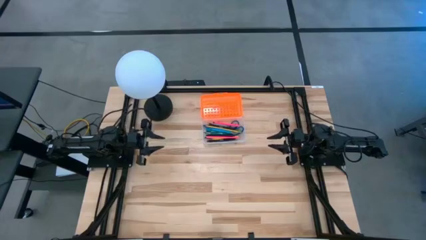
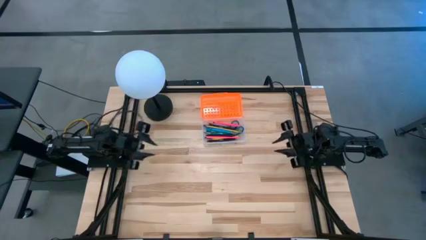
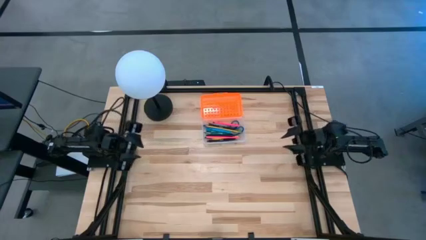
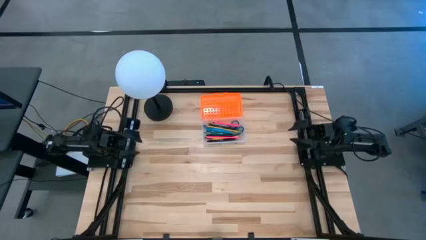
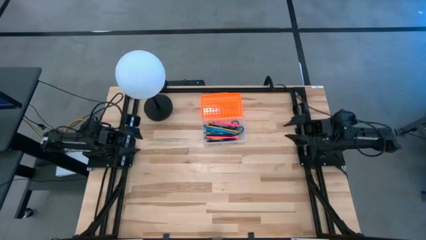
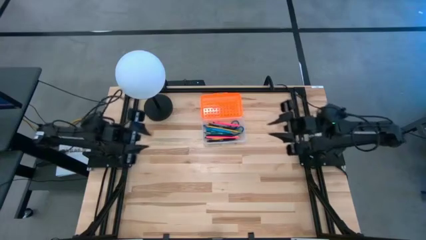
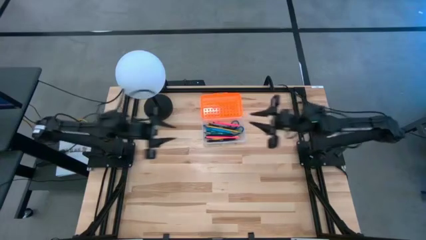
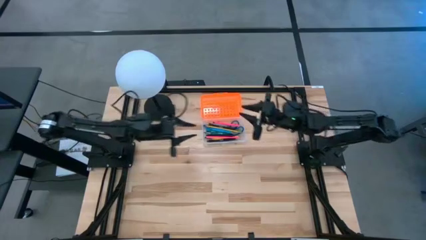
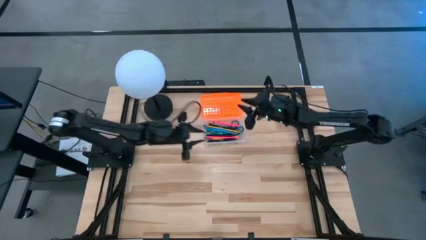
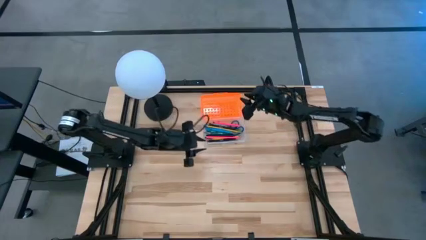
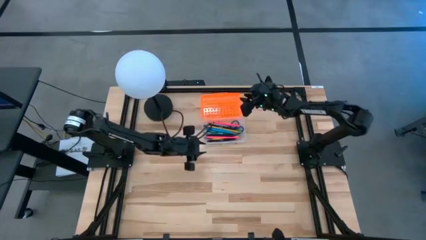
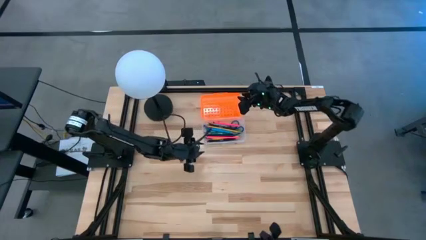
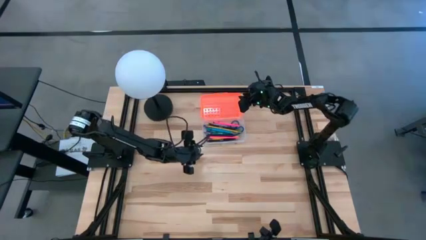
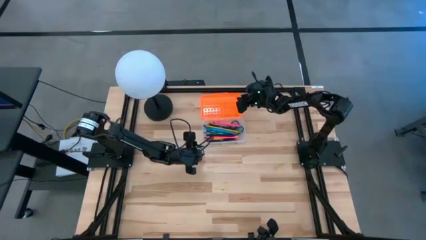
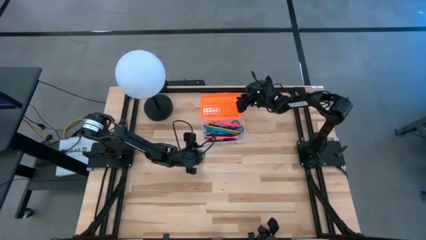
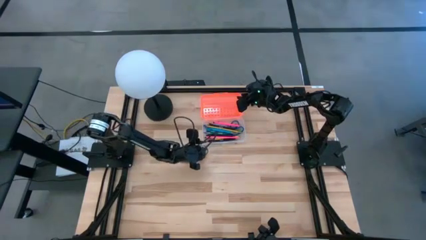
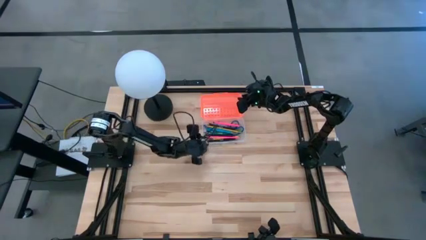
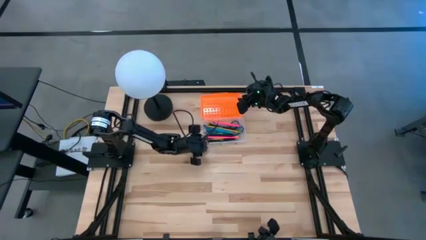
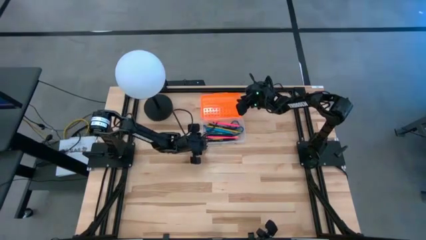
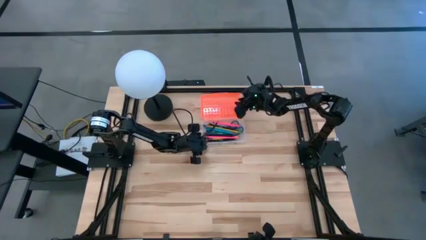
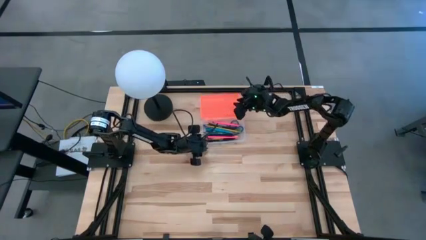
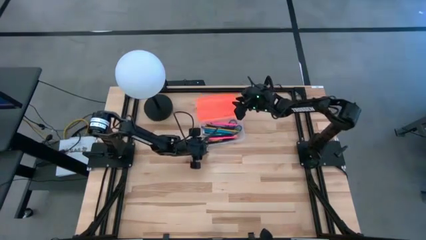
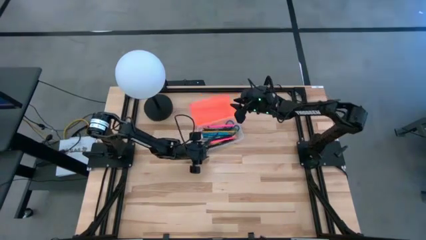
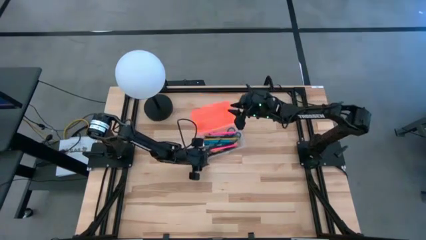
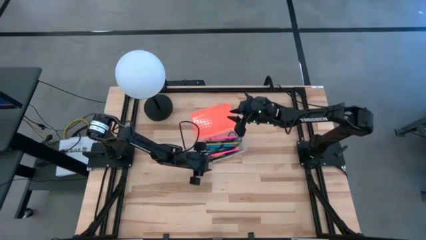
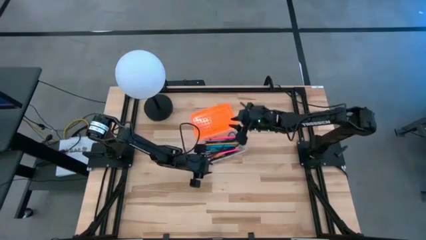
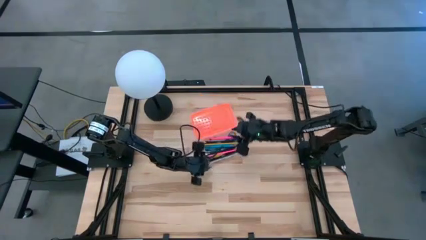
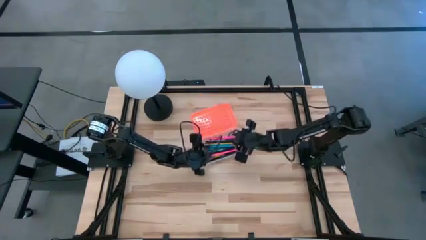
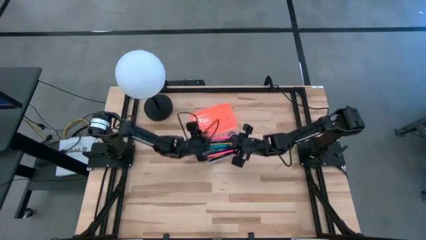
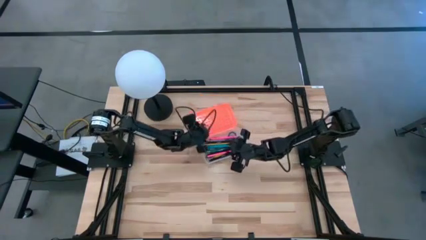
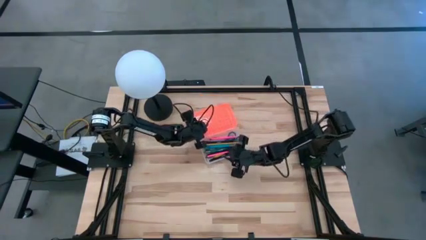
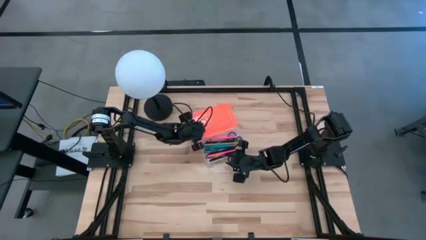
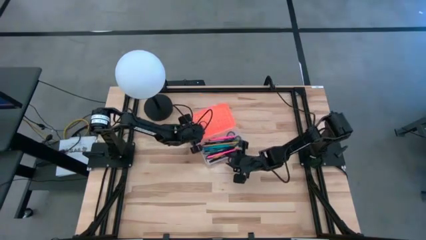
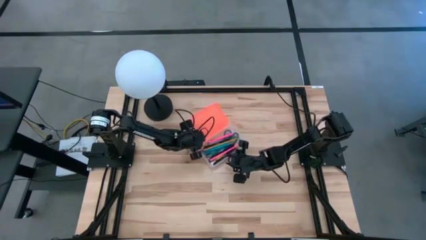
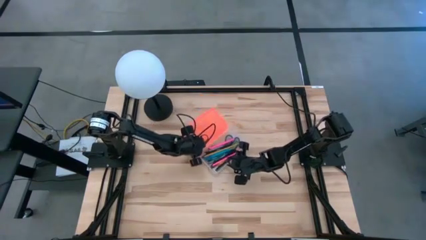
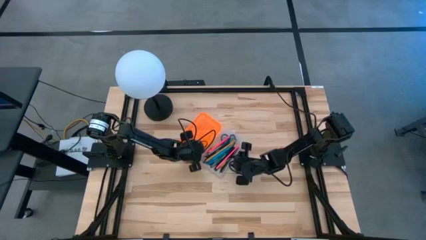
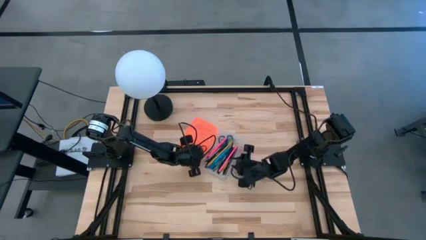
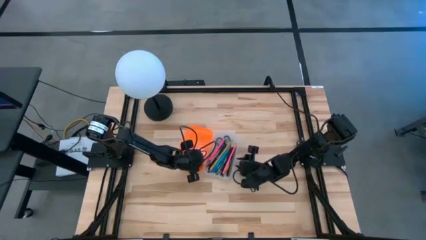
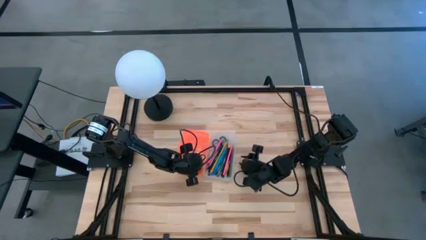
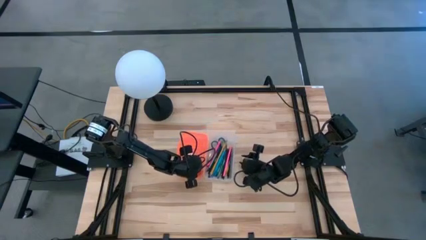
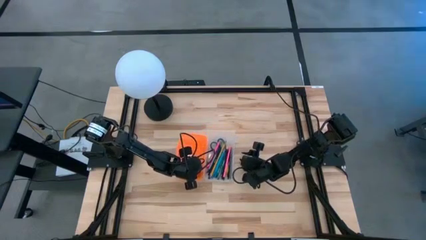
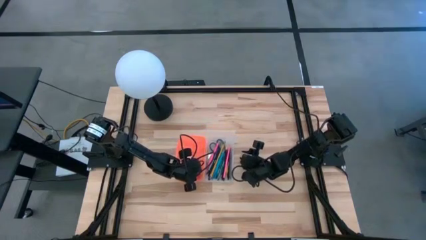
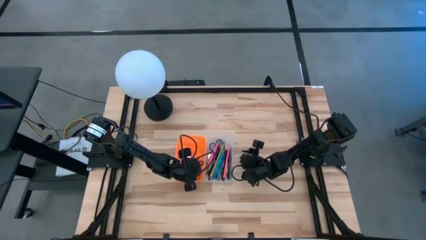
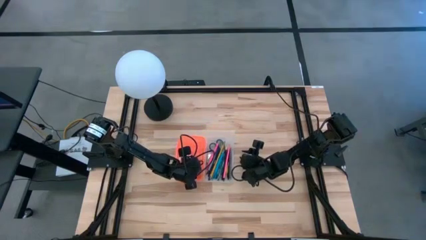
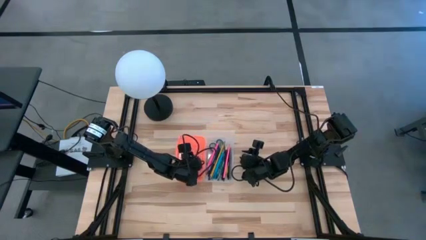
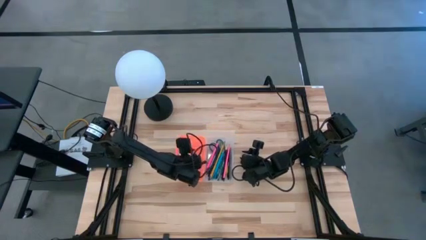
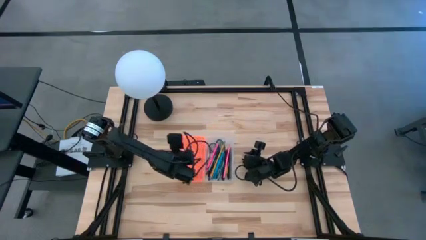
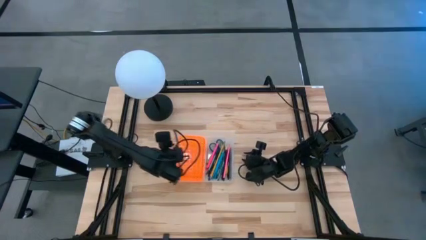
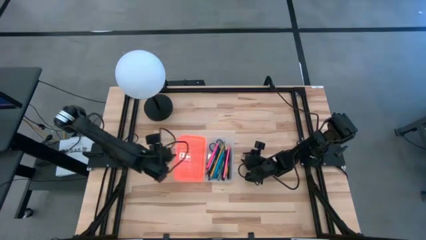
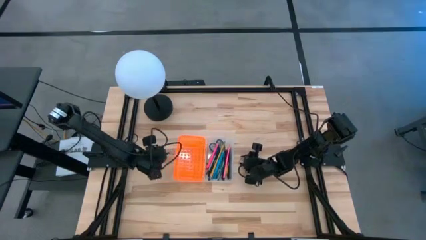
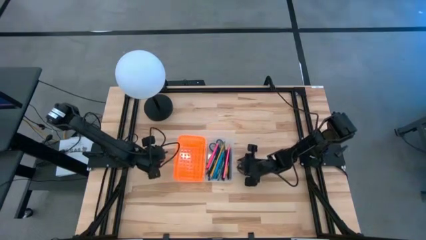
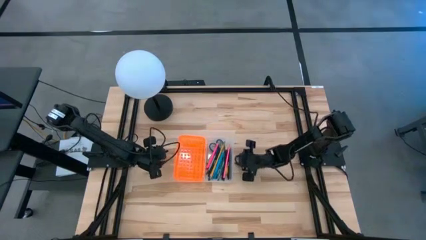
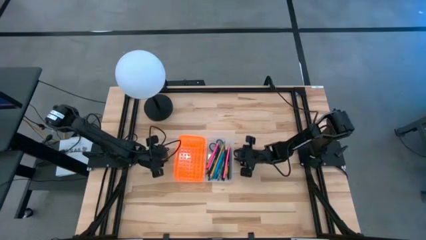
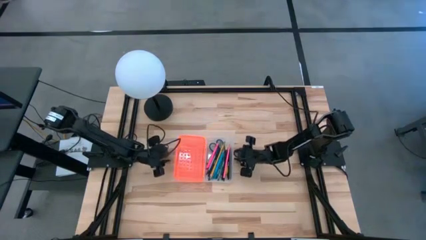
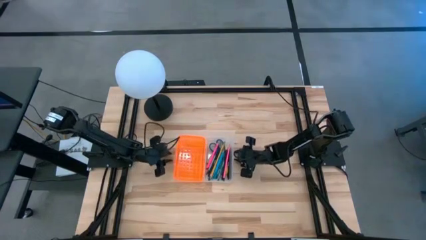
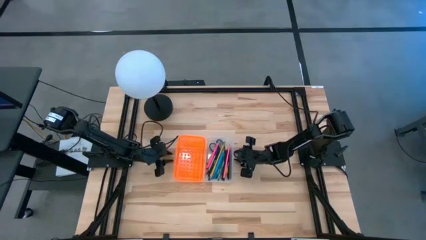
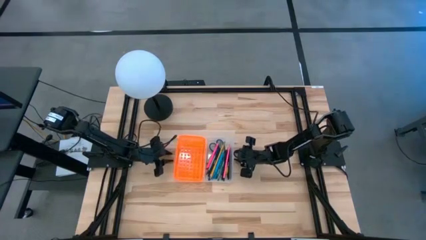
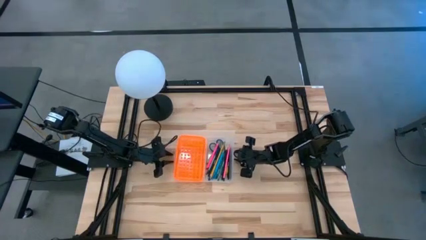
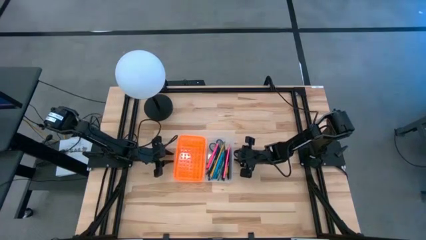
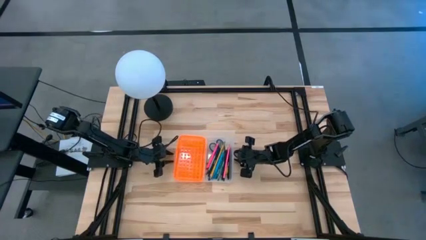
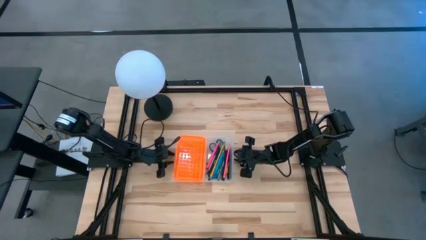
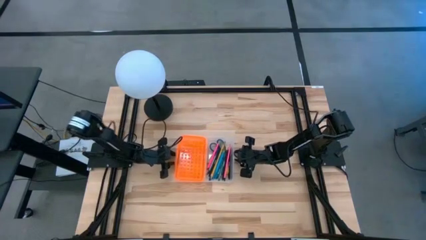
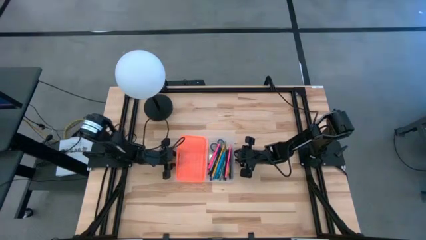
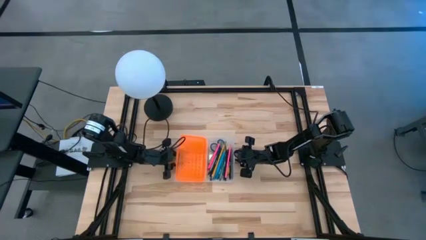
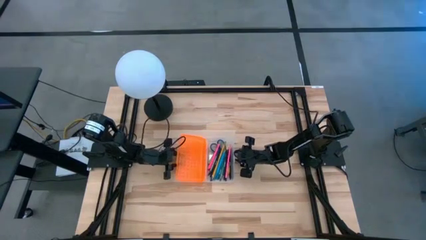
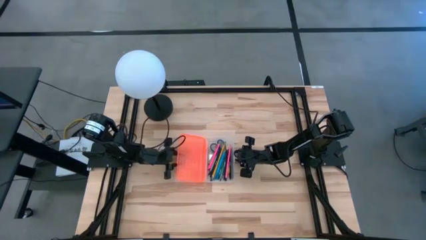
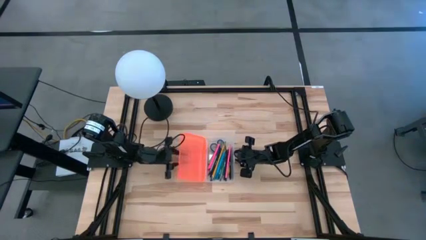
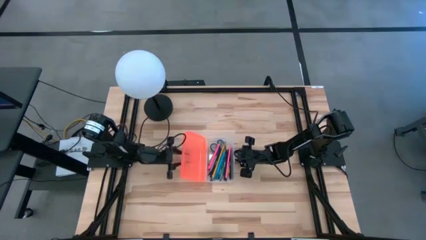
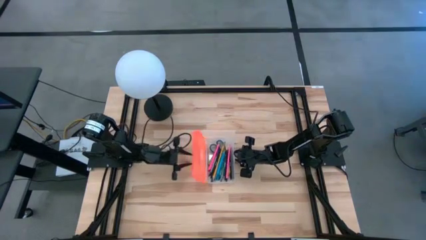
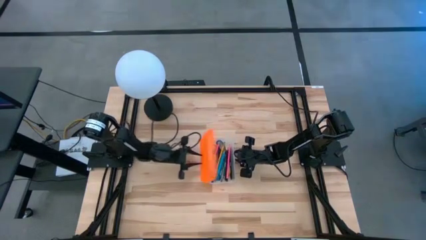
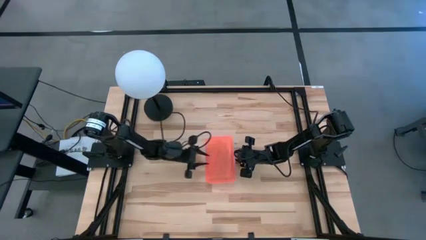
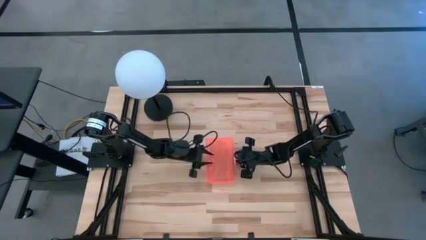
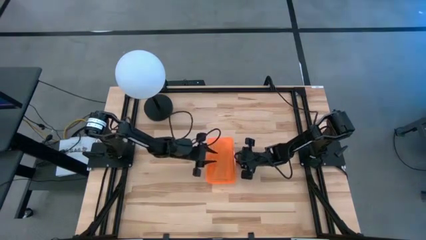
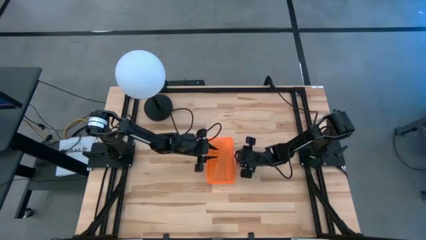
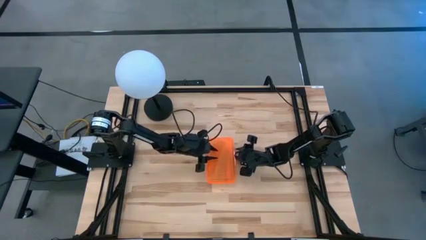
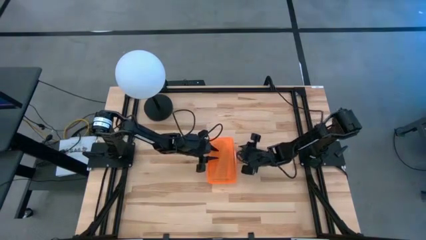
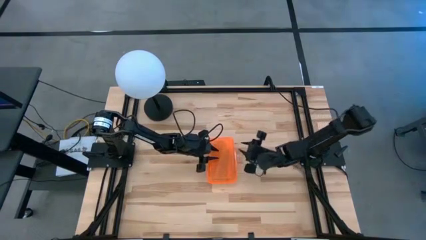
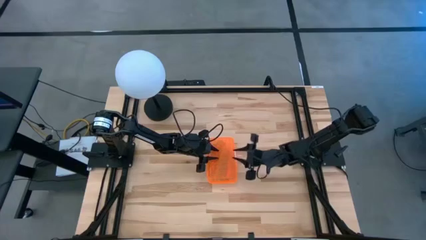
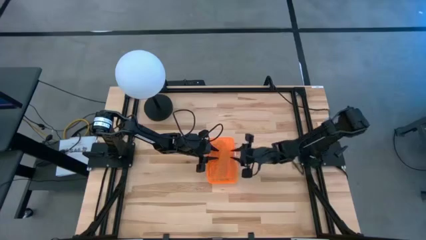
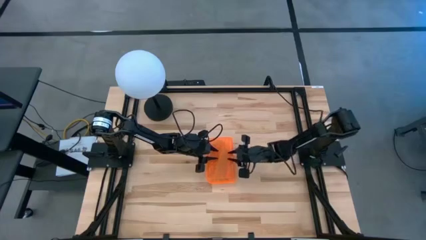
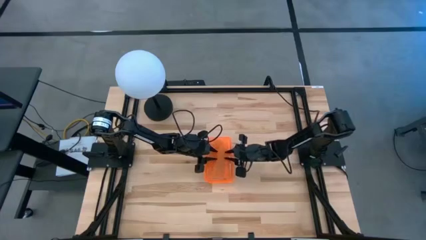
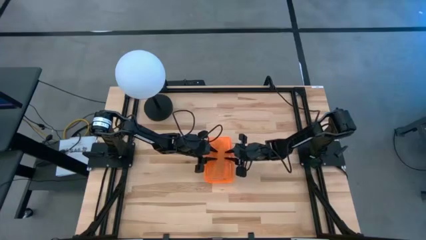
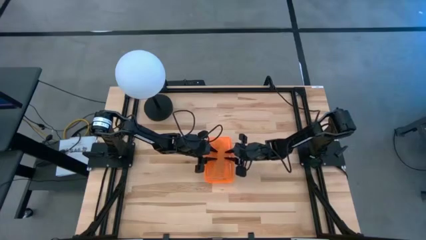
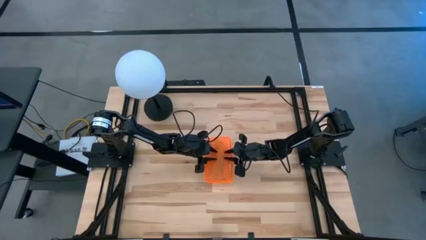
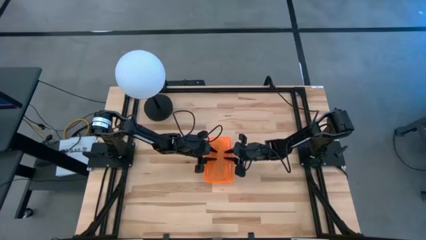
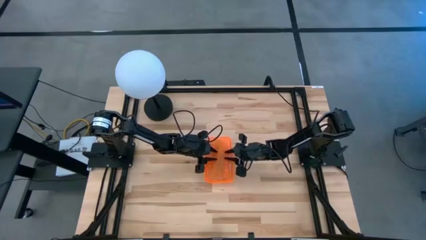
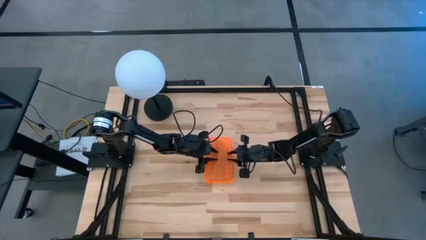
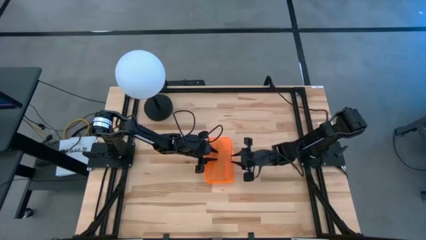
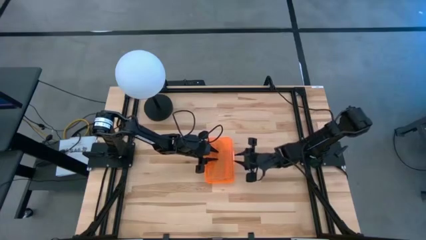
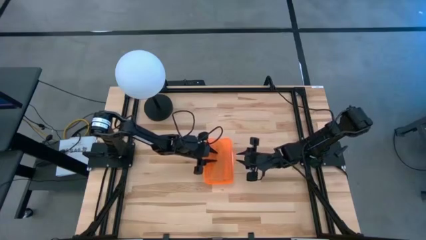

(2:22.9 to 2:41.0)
Task: Pick & place school supplies into a supply box
Close the orange supply box
